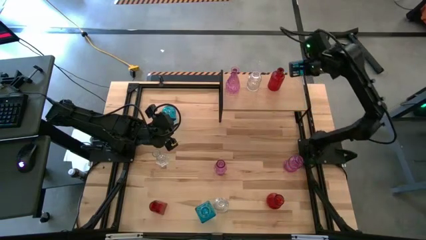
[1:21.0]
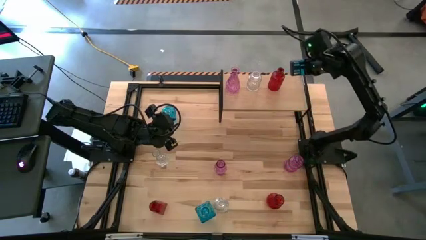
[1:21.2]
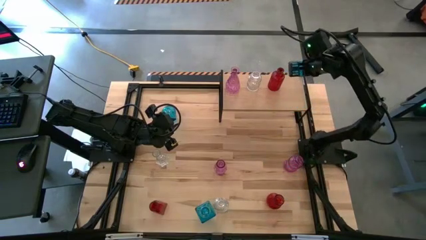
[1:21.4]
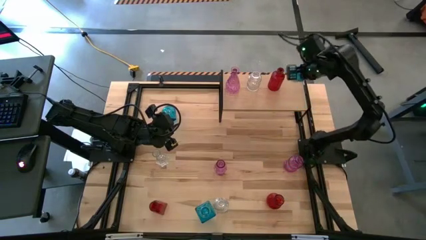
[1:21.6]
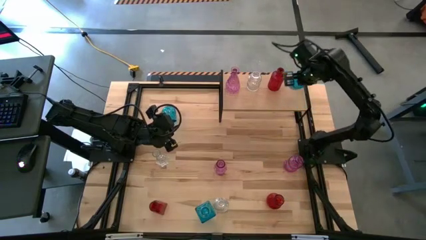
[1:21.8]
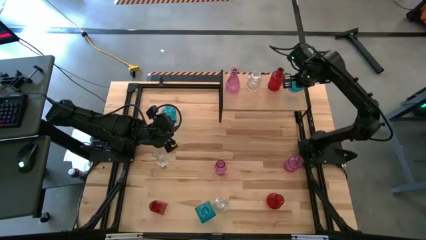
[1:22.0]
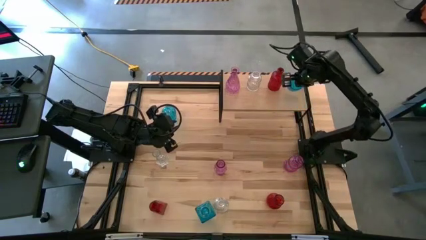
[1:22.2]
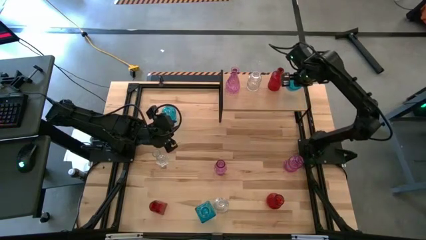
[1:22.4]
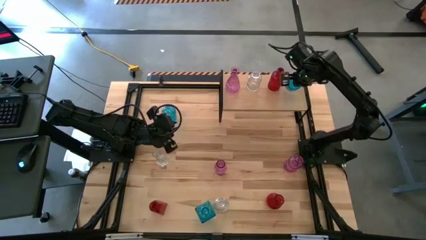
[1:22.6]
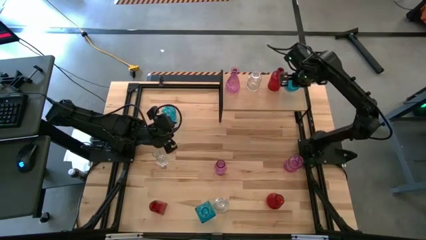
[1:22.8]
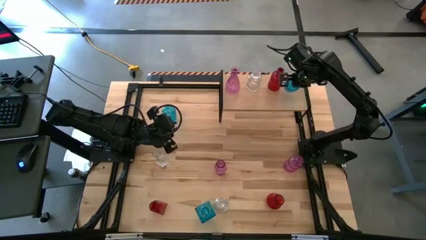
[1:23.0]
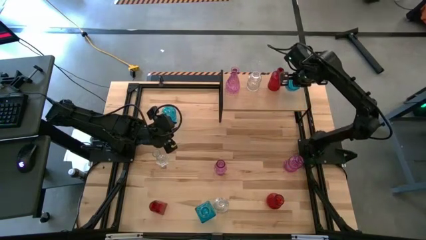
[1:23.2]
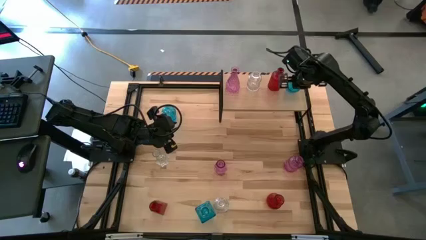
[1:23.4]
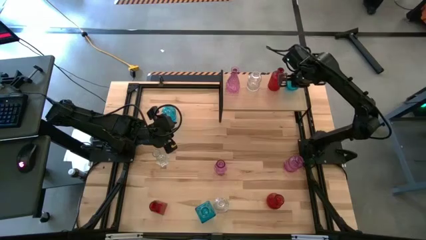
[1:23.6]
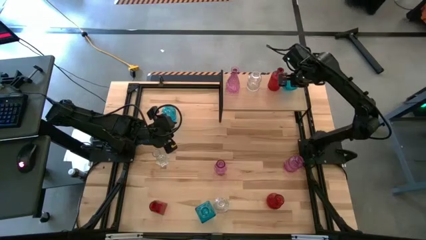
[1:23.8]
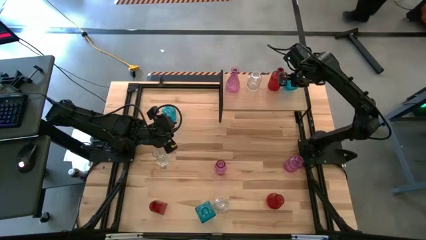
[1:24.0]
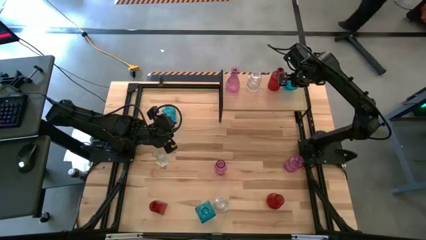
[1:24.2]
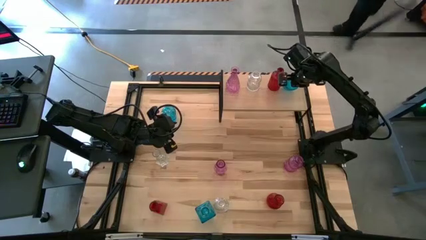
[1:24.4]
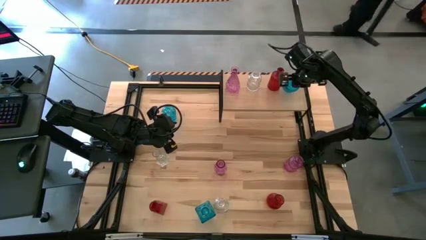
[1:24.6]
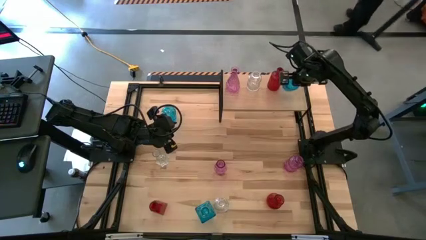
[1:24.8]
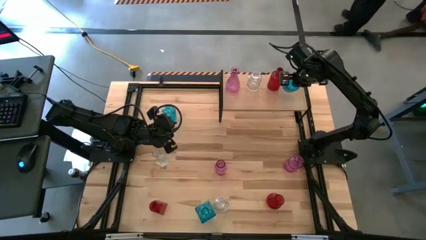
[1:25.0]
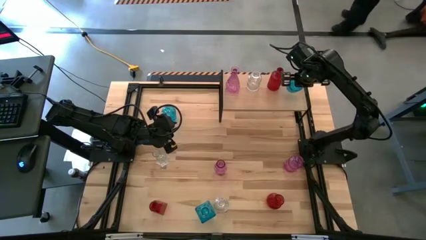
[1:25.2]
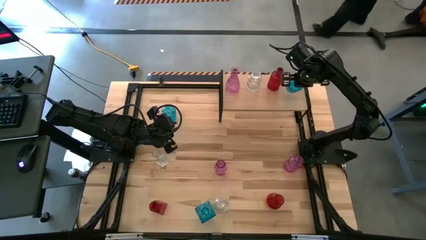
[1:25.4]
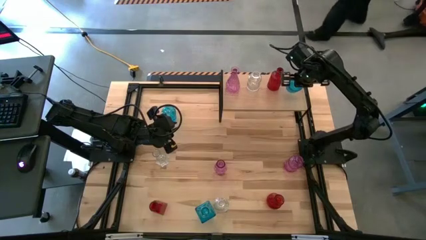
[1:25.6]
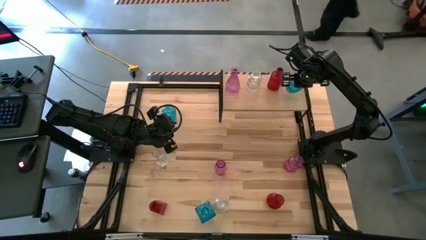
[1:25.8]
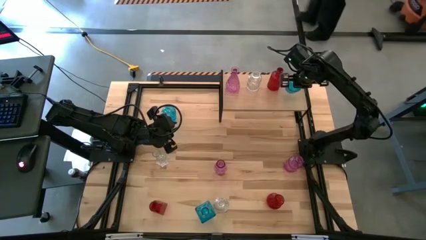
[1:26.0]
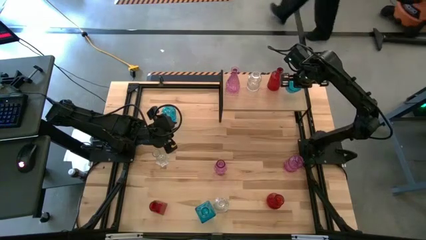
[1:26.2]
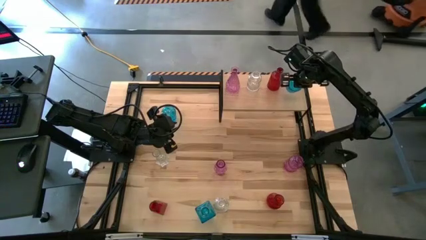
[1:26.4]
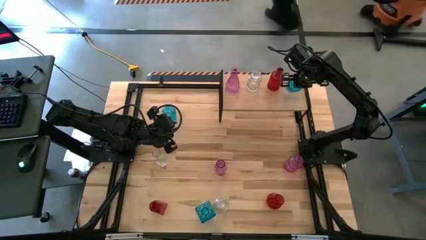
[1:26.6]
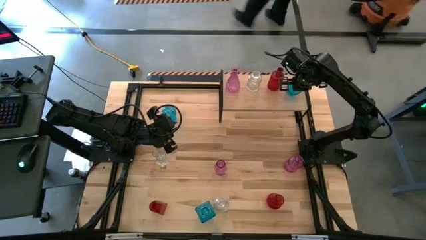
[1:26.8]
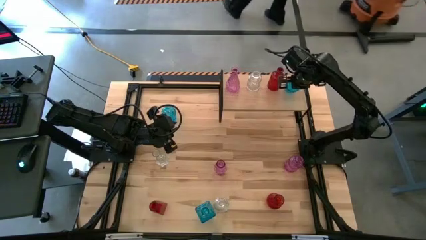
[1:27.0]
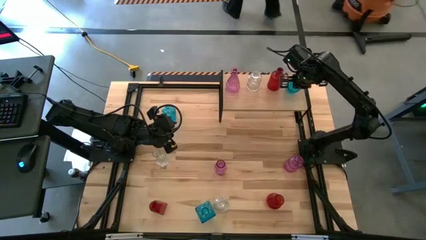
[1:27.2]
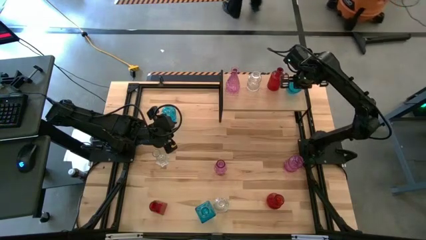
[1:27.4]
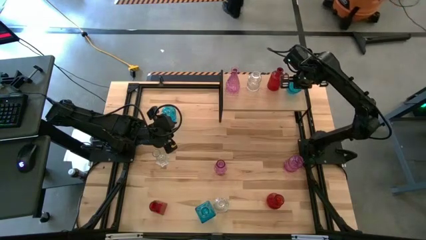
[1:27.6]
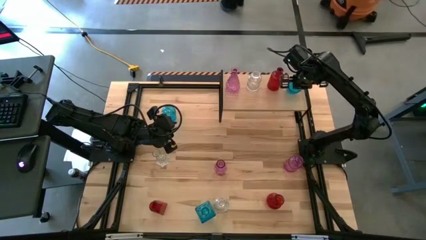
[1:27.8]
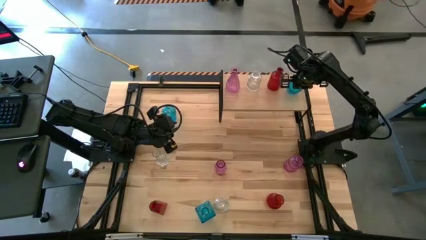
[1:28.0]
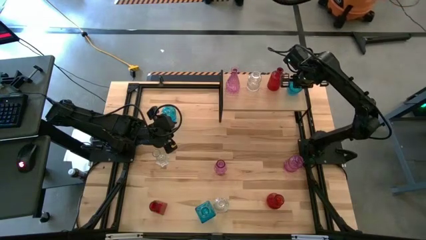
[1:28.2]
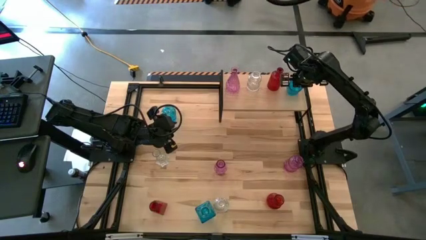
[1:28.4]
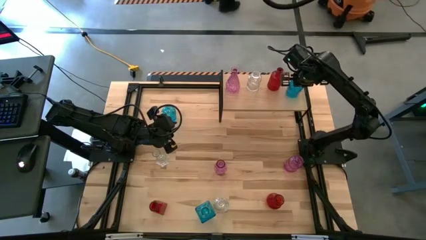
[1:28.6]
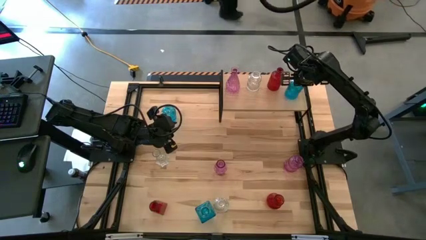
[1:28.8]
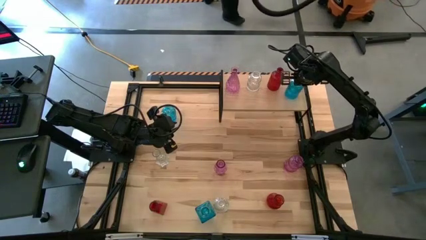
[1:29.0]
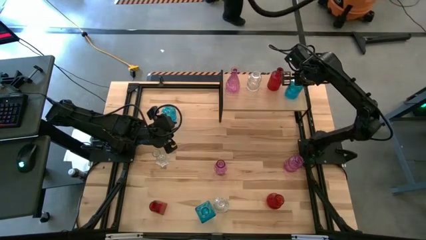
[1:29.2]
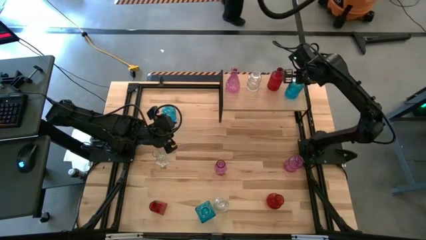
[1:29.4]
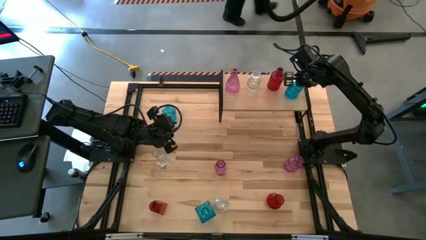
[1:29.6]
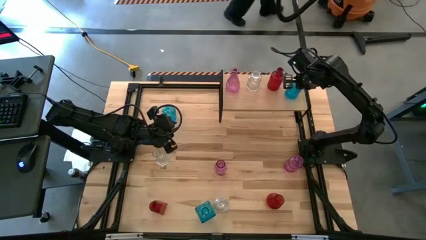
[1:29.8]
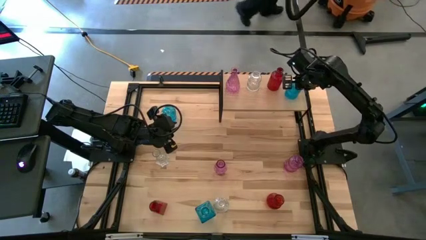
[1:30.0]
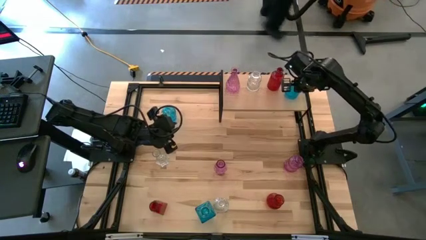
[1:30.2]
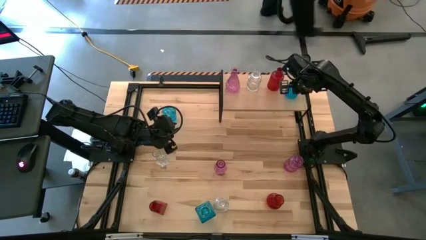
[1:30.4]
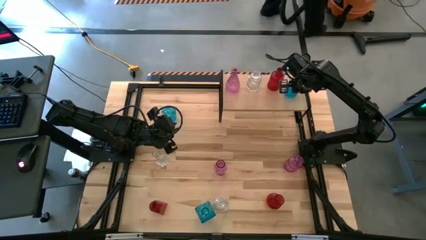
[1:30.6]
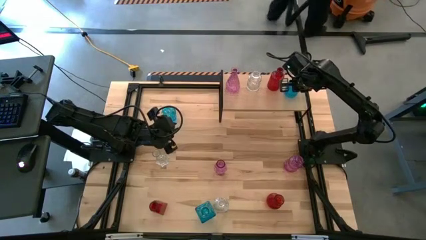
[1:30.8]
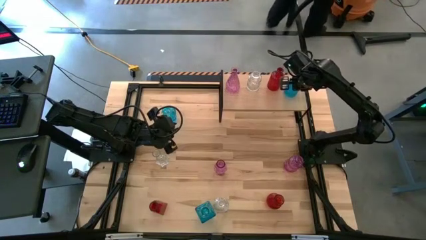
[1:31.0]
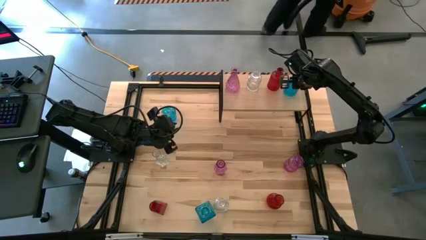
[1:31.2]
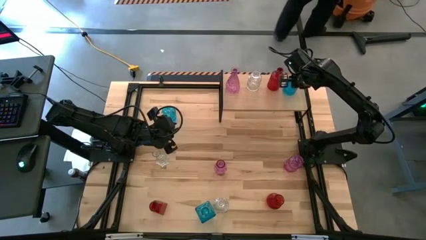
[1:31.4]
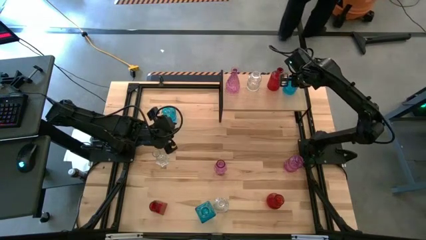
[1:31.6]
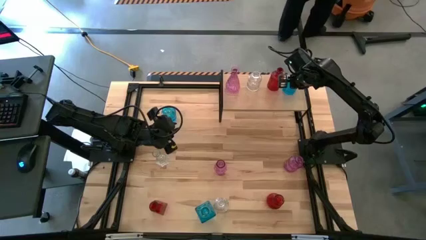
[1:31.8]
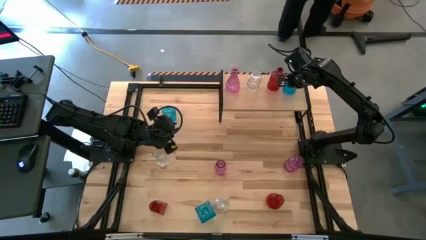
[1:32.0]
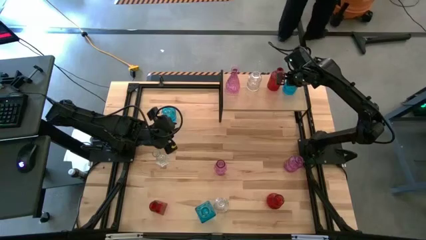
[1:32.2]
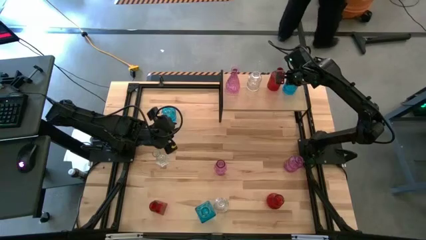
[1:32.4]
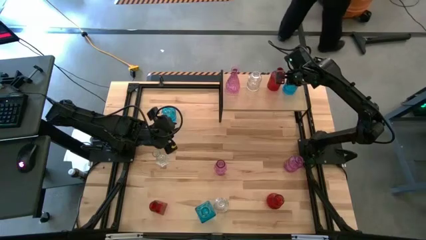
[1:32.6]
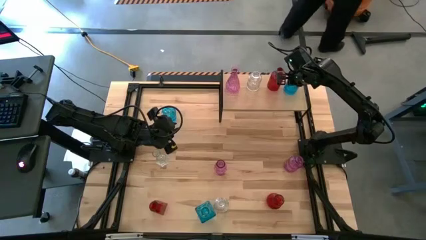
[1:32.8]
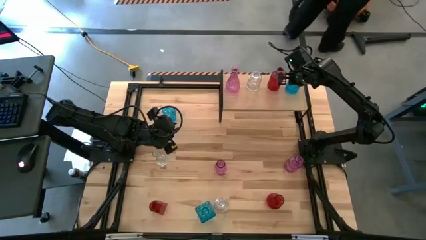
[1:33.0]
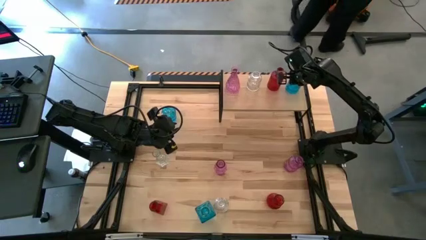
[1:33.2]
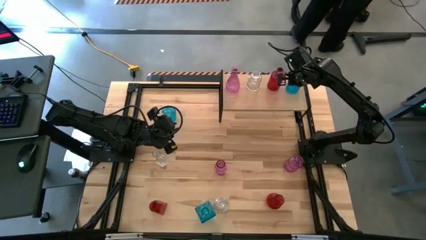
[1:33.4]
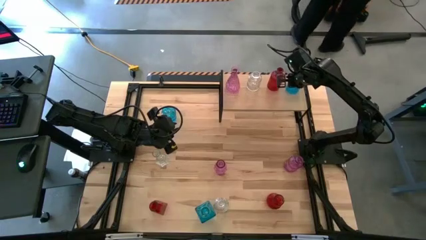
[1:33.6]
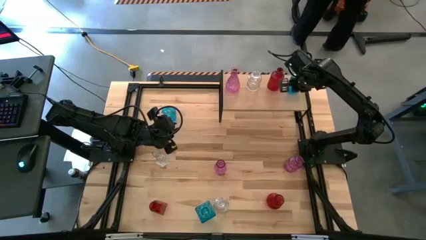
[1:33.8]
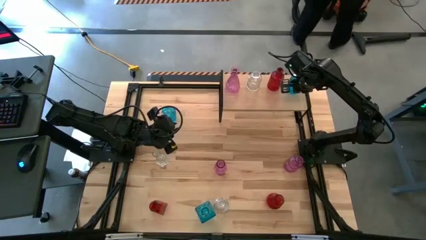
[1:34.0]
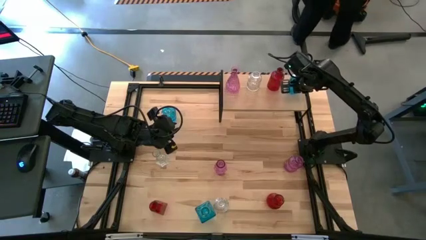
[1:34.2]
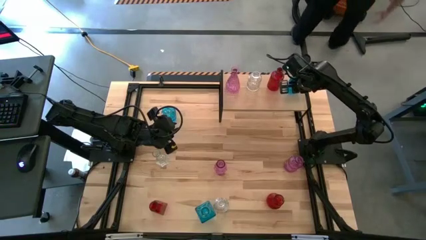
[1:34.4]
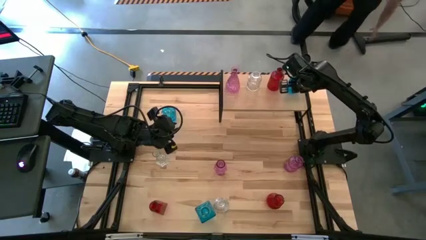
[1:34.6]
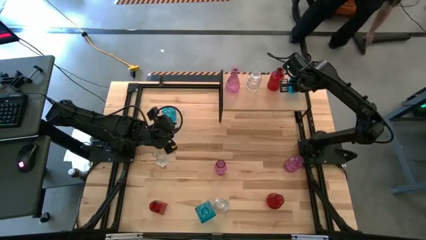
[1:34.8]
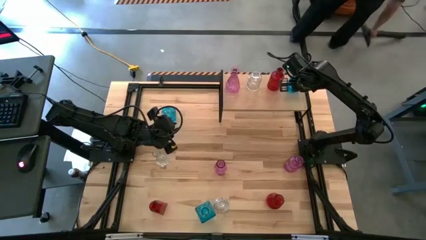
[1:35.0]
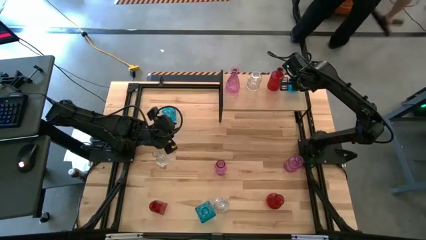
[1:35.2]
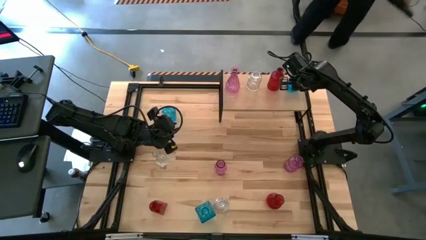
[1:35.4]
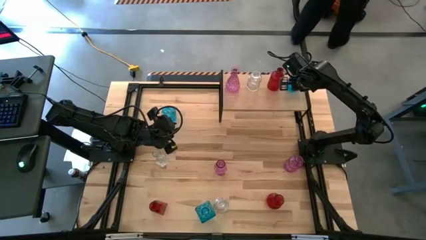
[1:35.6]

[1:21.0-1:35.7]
Task: sort vases onto shelf
Put the bottom right blue vase on the shelf
